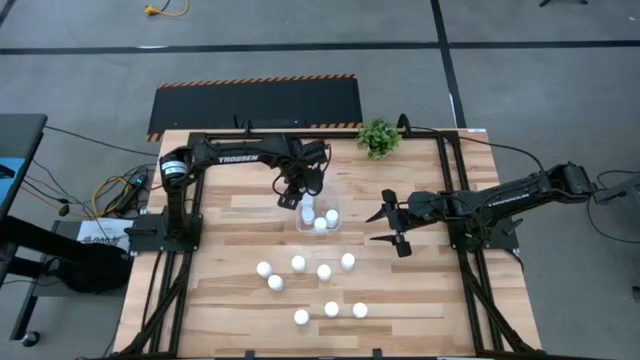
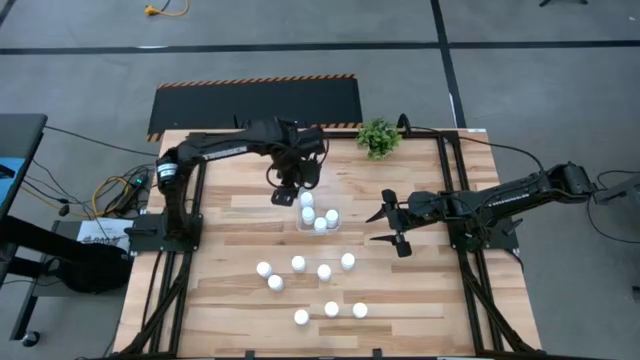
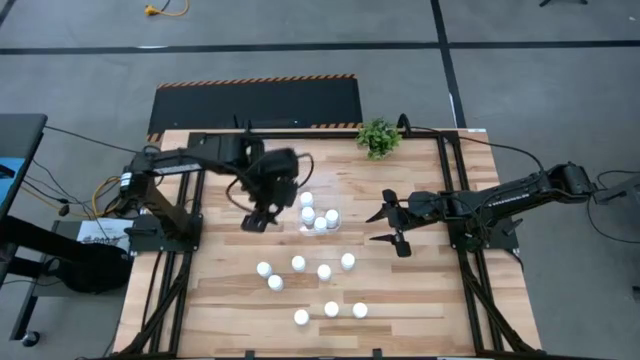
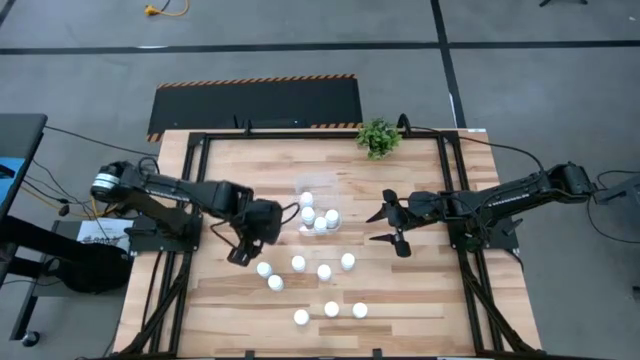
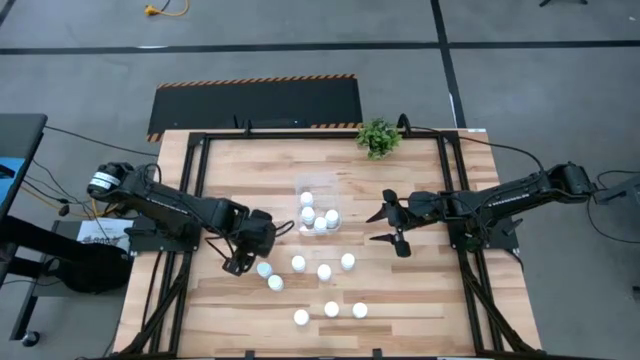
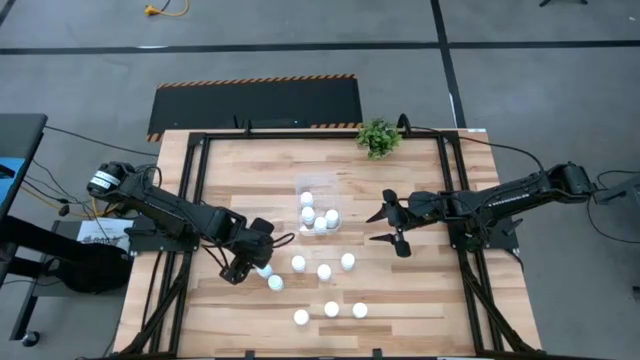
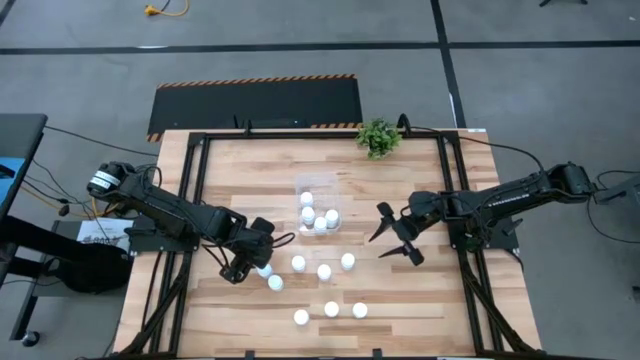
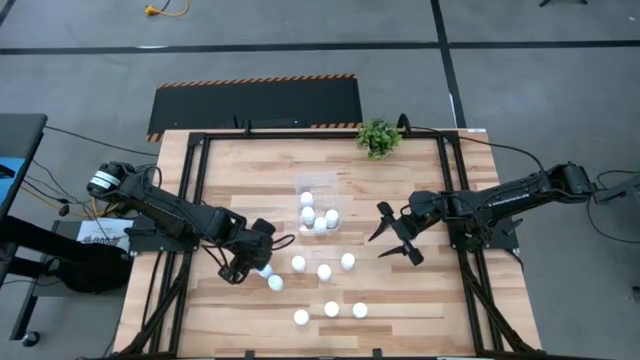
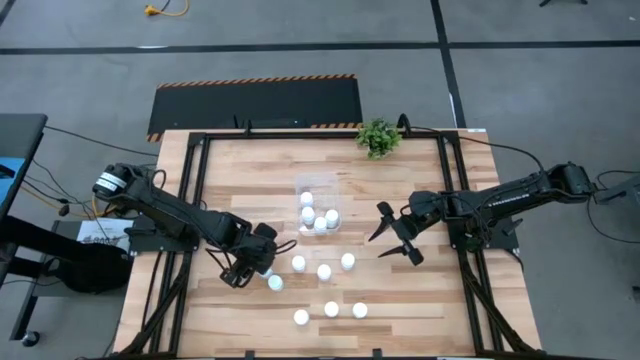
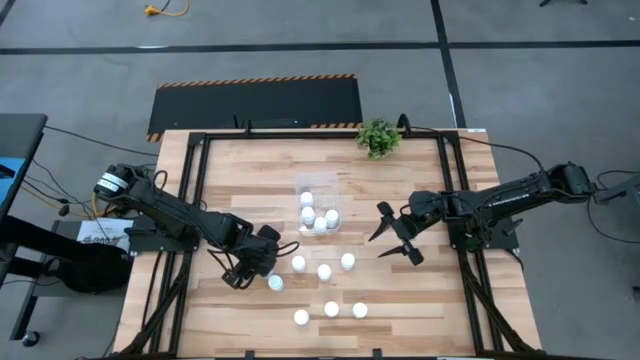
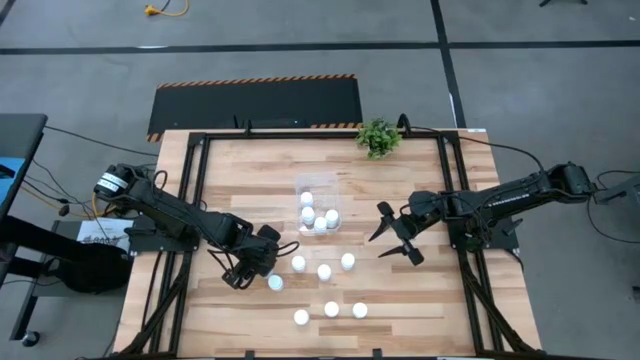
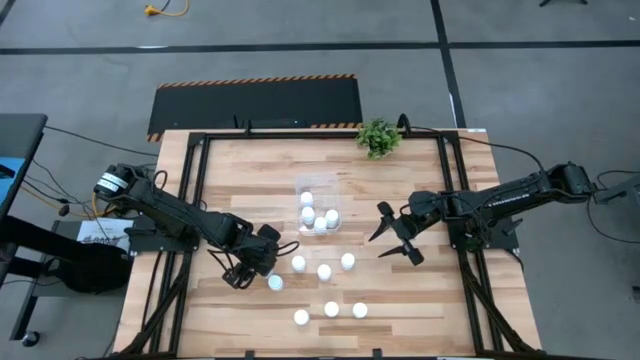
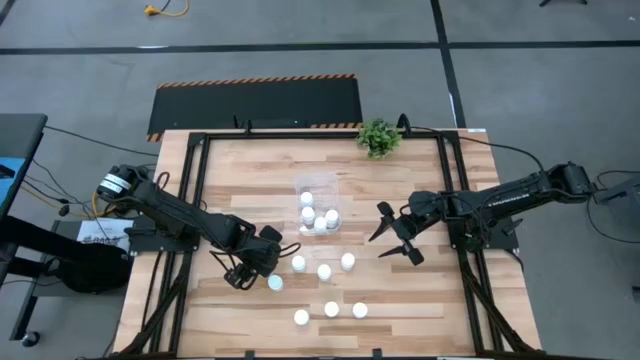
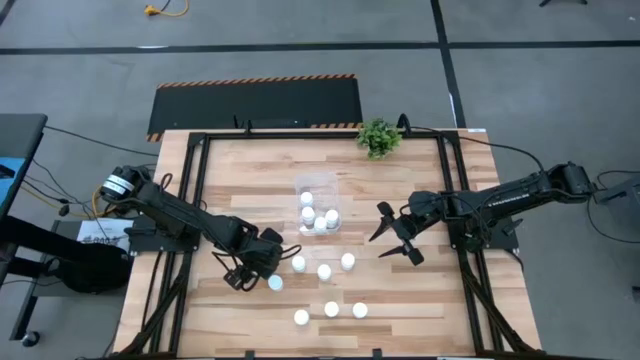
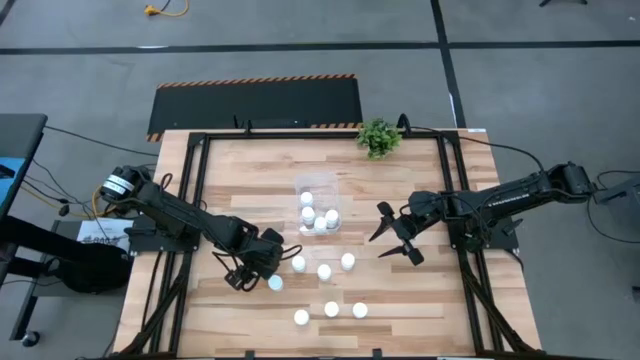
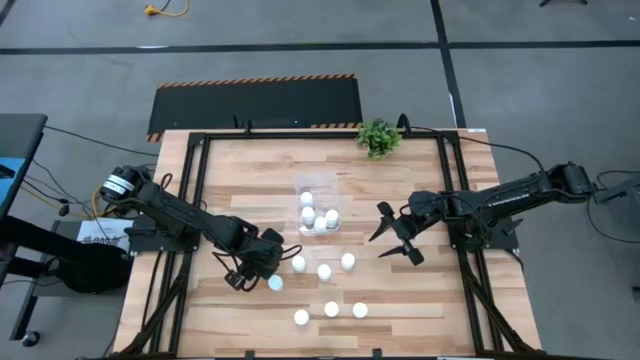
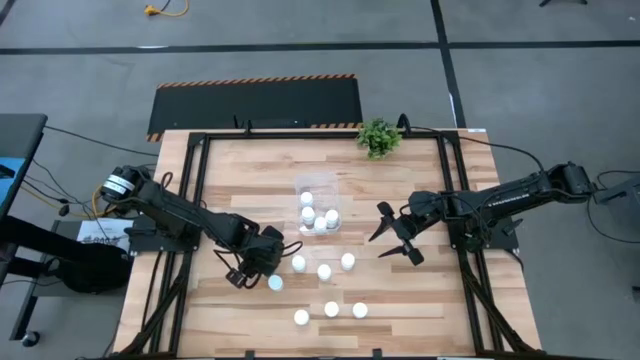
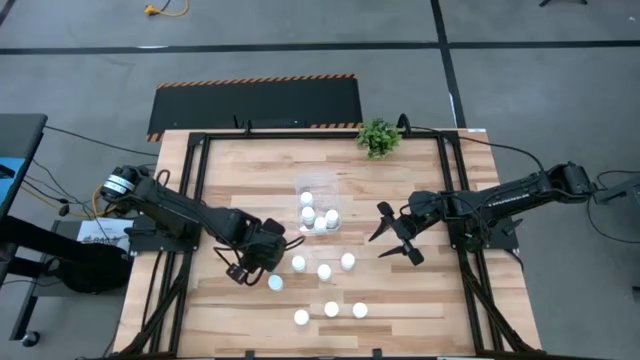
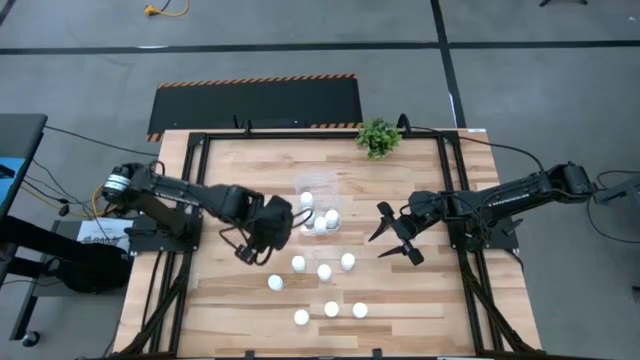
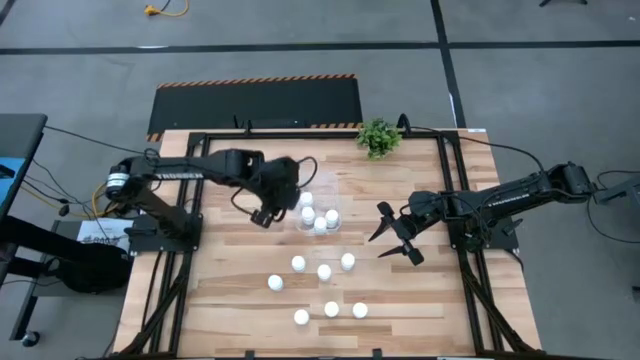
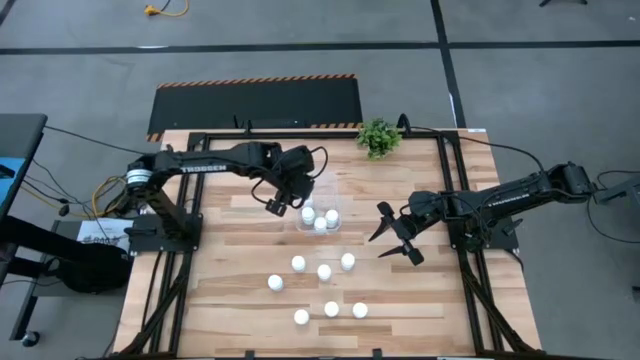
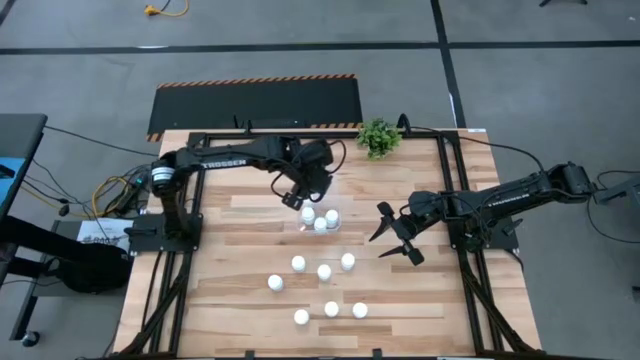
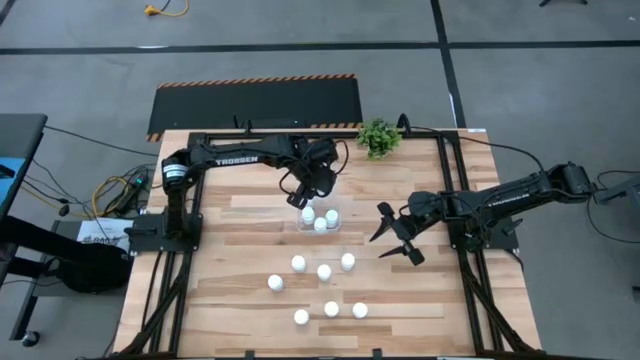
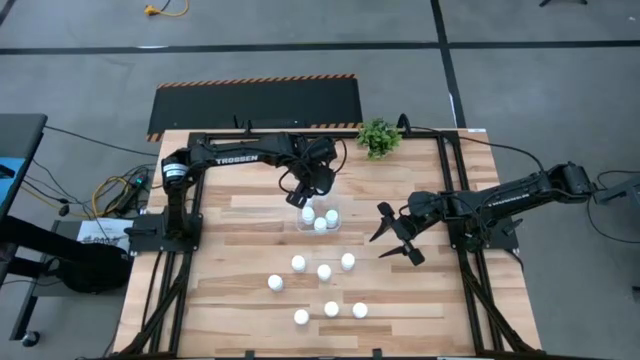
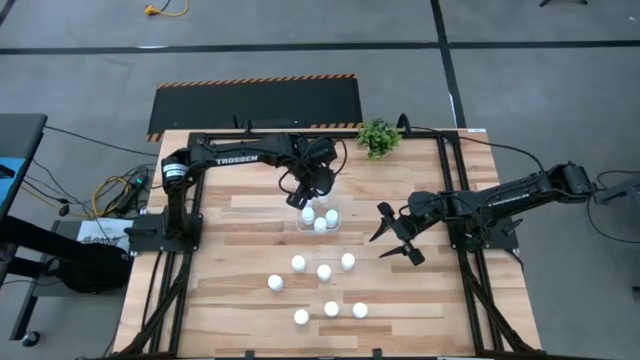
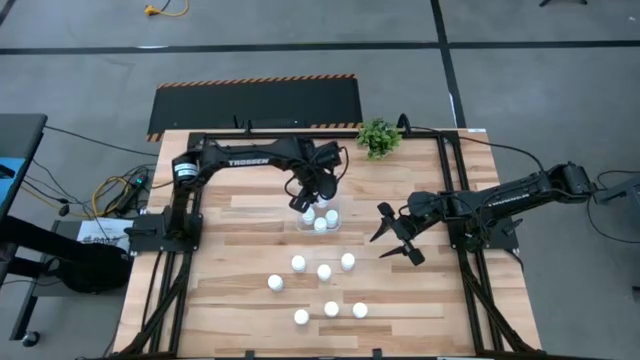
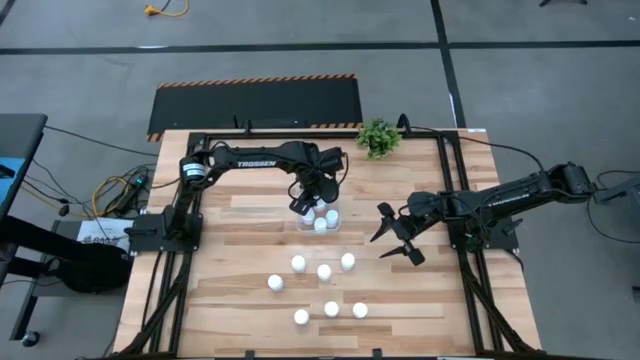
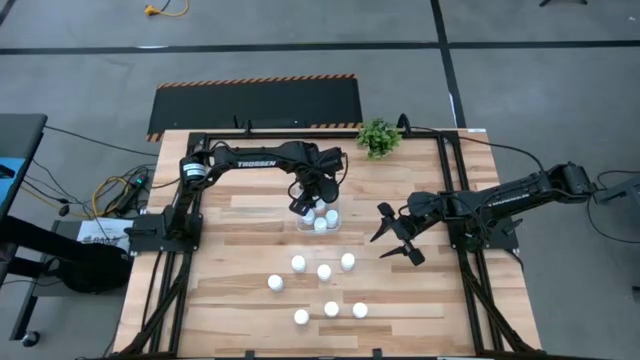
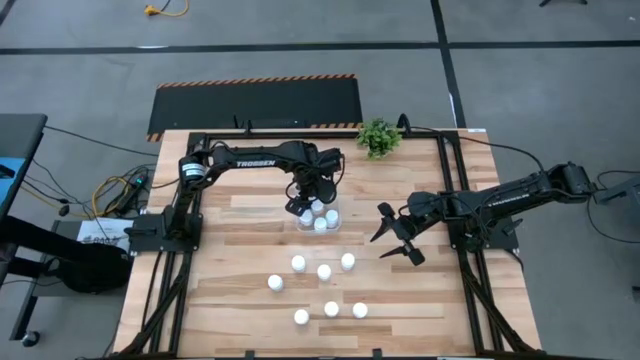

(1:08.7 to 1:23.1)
Task: Pick and place pill bottles into a basket
Put the pill bottles into the container

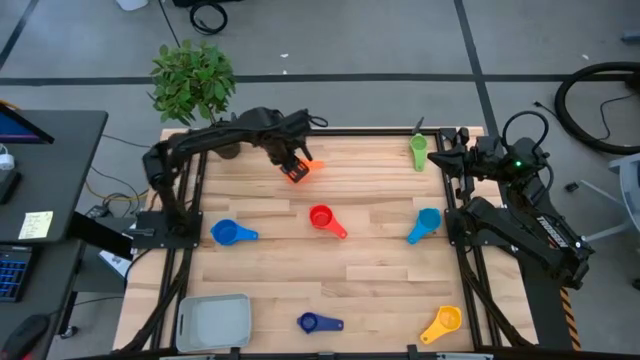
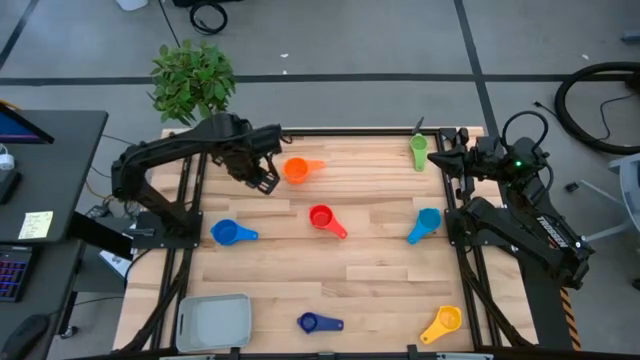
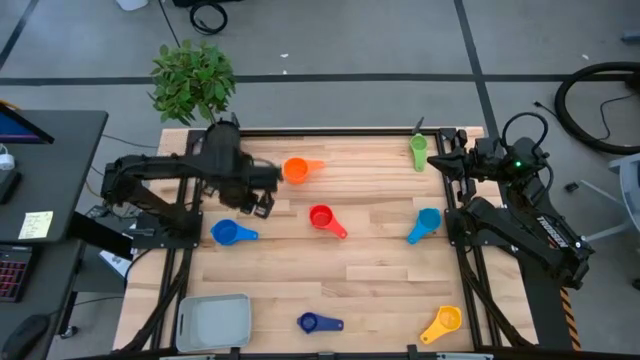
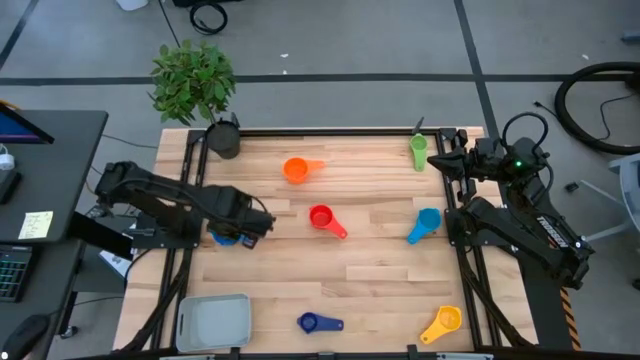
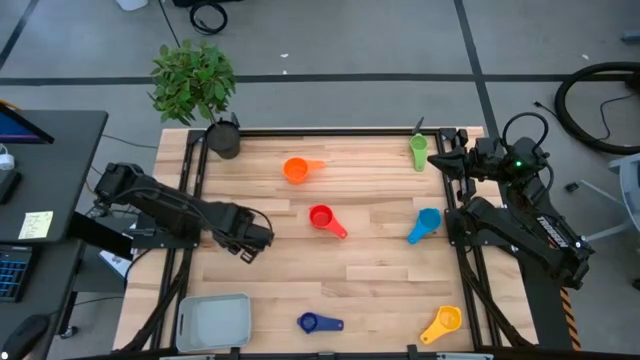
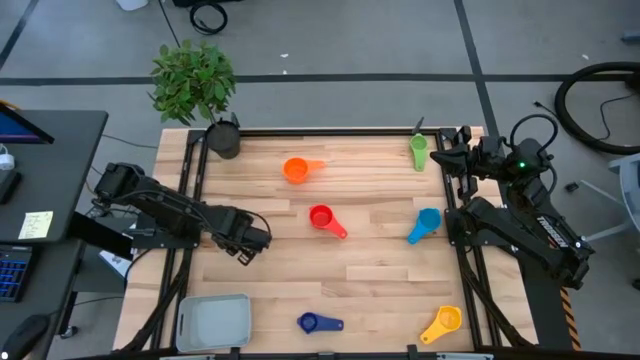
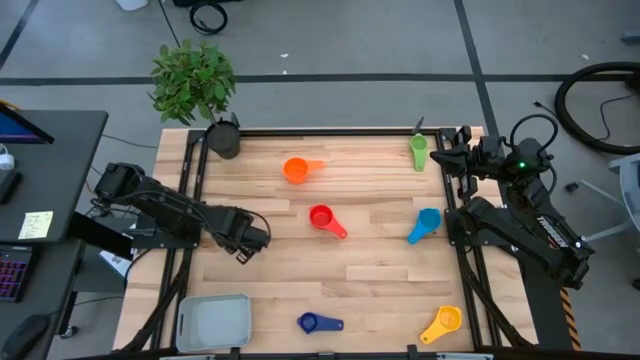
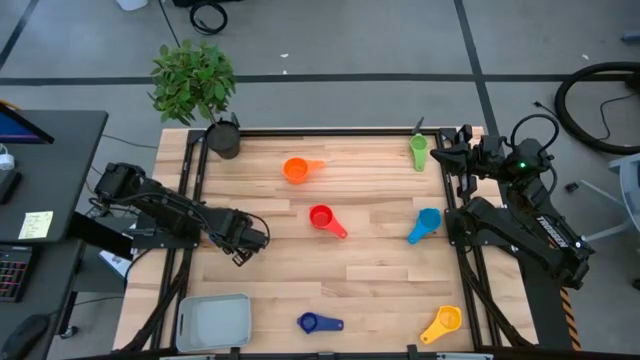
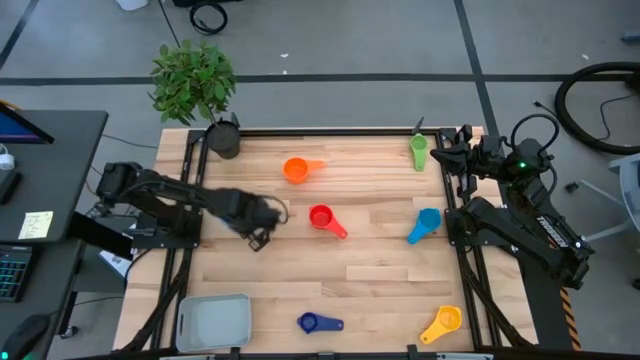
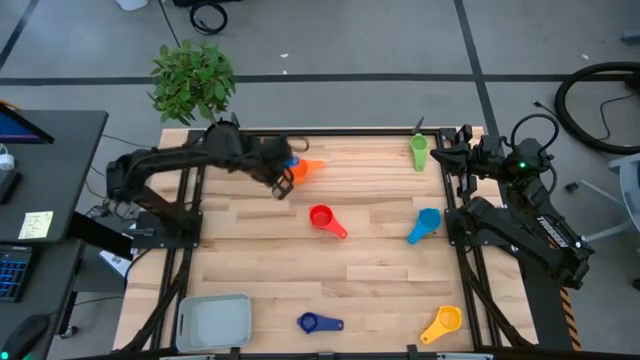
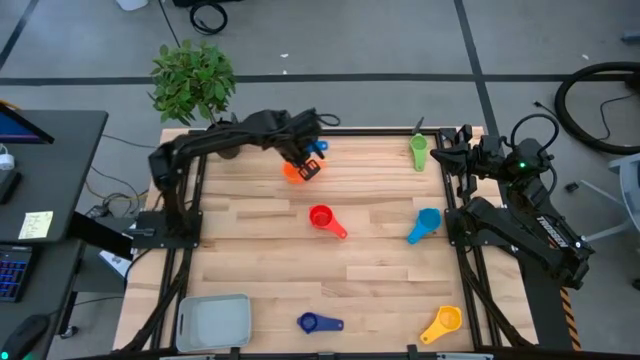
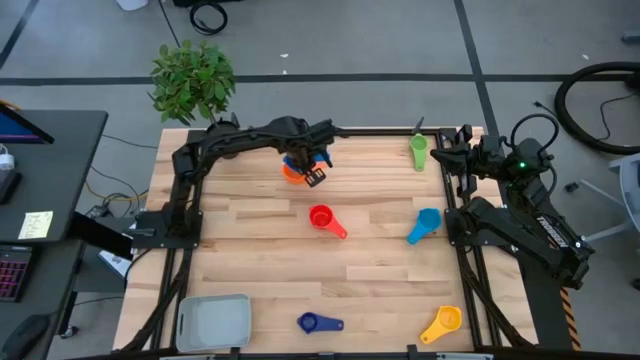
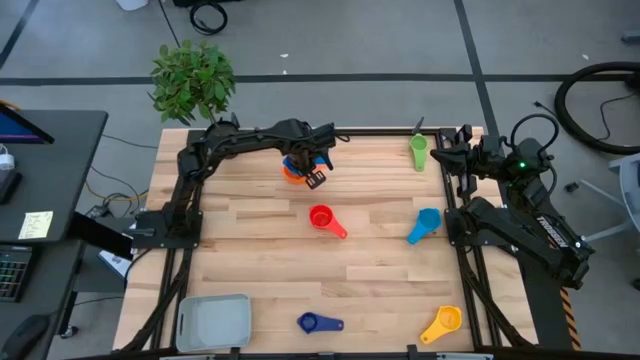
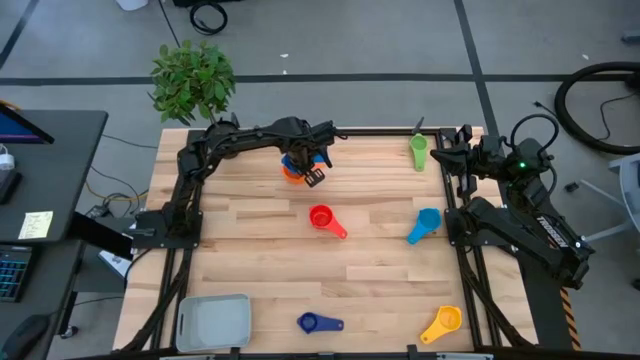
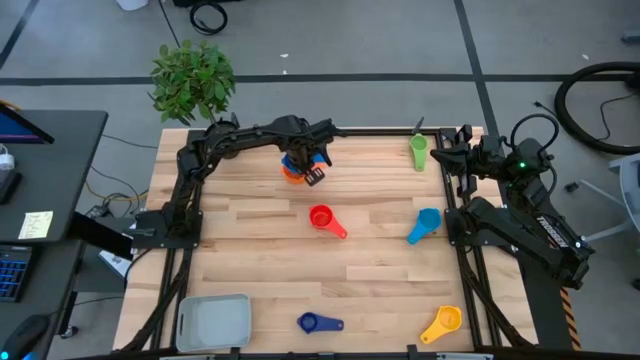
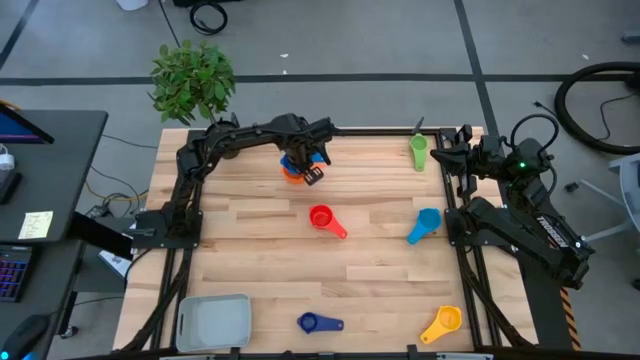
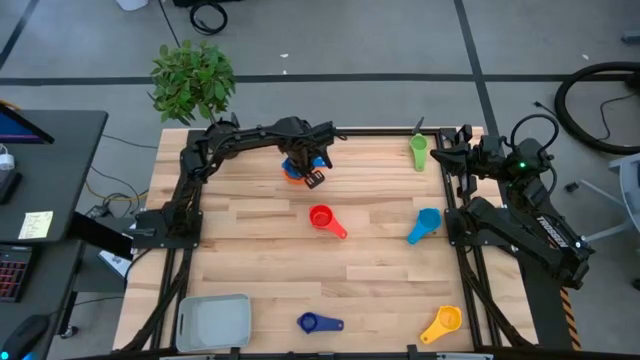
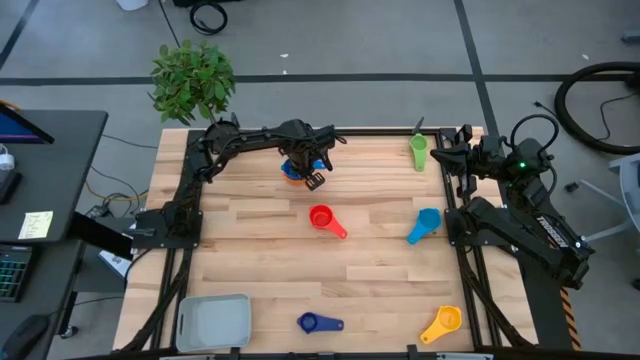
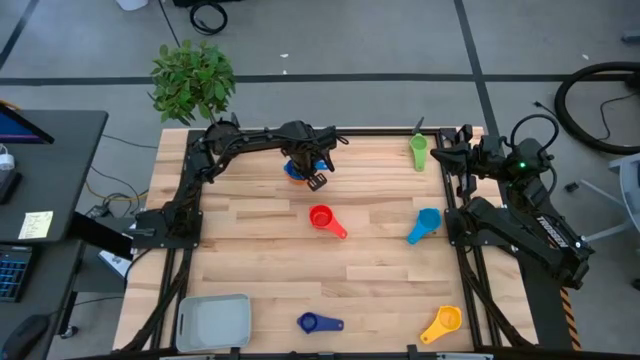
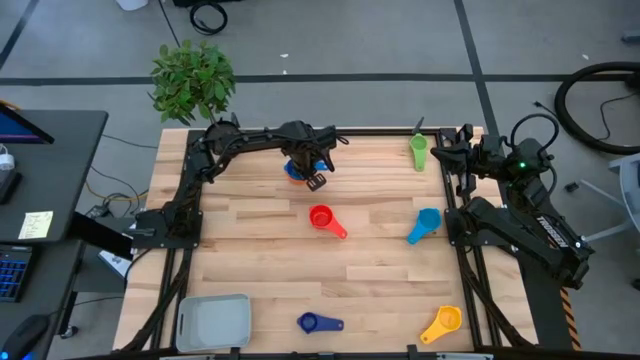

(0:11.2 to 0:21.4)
Task: Nest measuring cups in basket
Stack the left light blue measuring cup on top of the orange measuring cup
